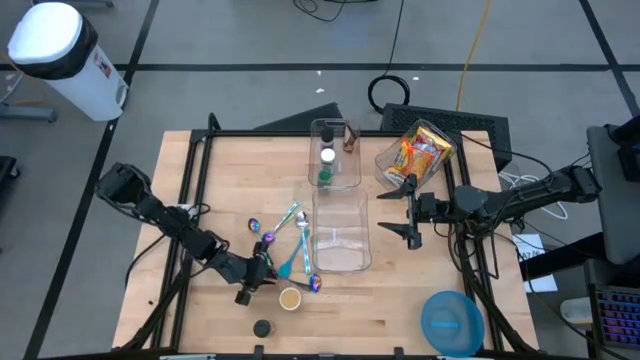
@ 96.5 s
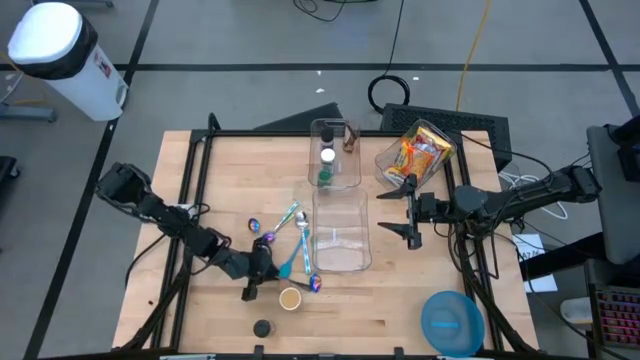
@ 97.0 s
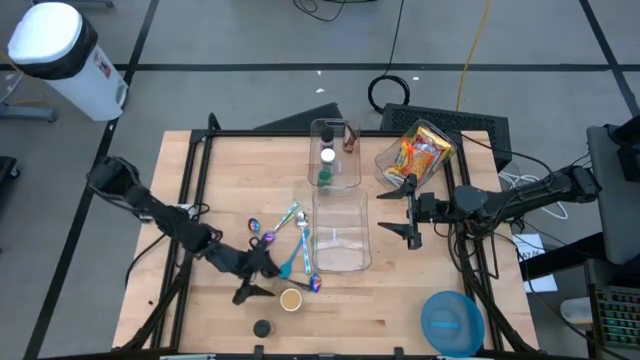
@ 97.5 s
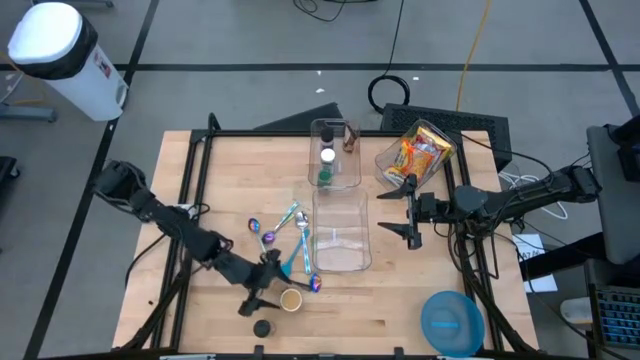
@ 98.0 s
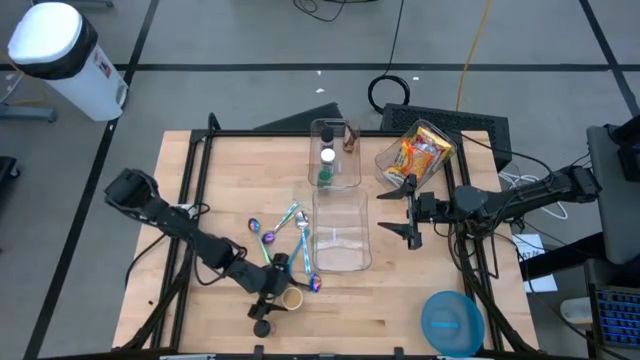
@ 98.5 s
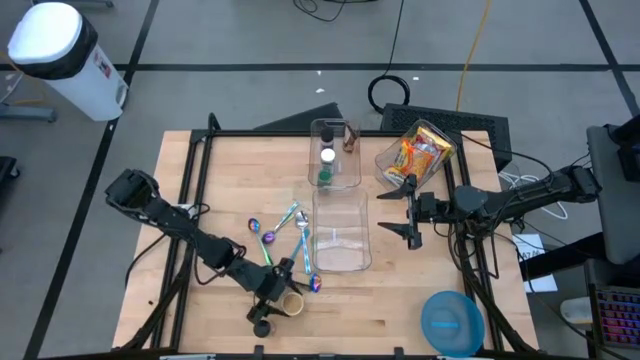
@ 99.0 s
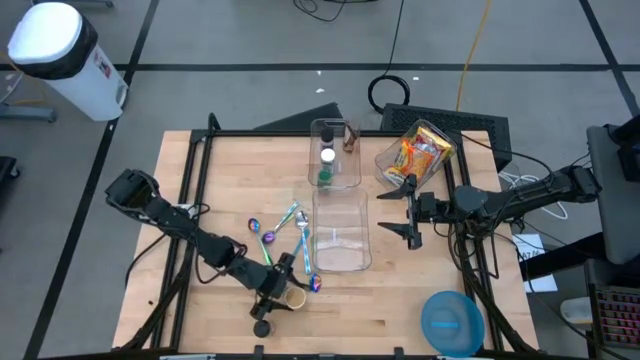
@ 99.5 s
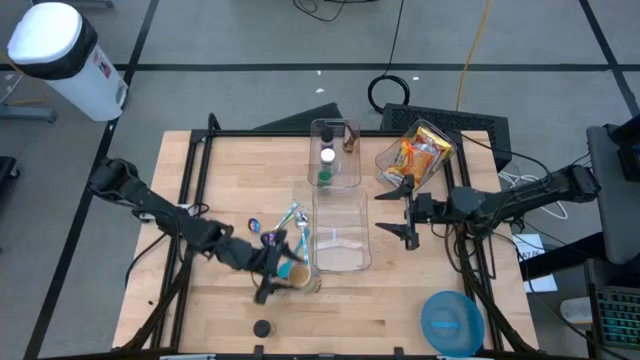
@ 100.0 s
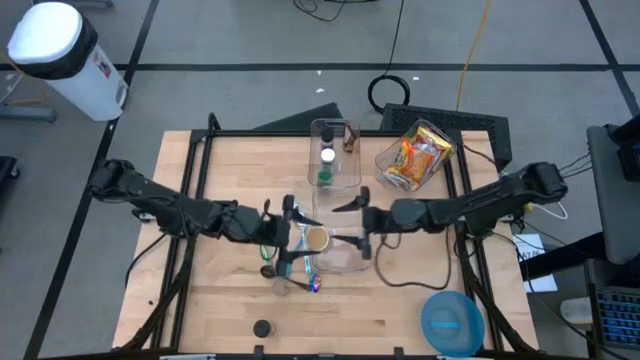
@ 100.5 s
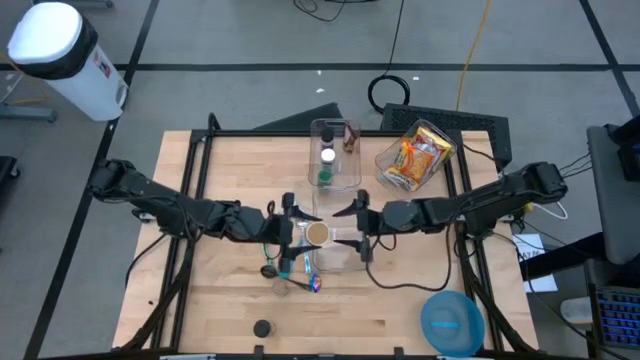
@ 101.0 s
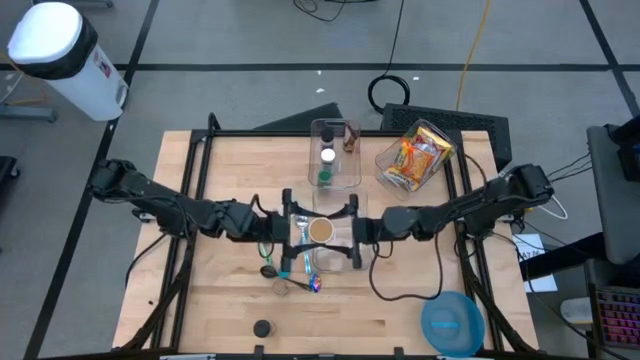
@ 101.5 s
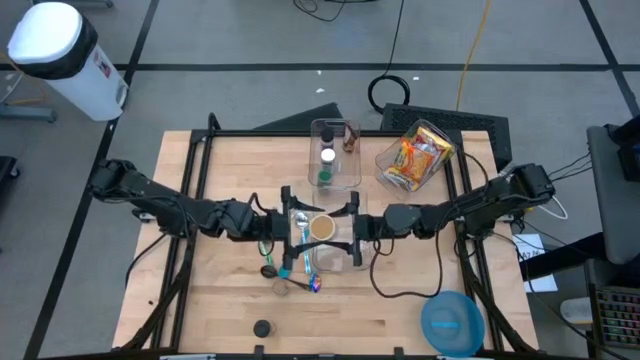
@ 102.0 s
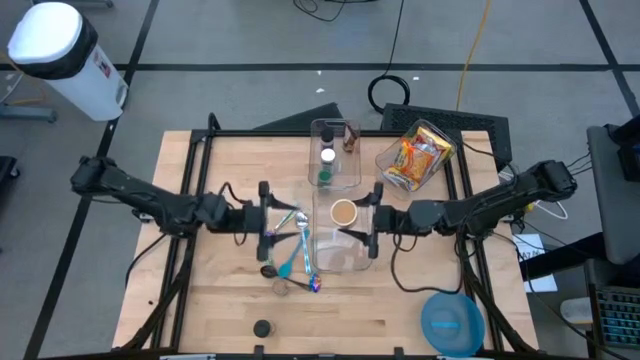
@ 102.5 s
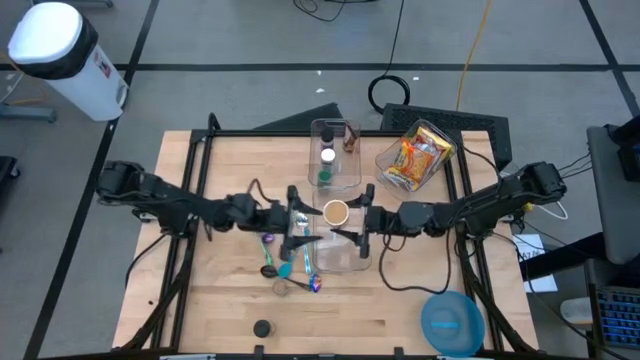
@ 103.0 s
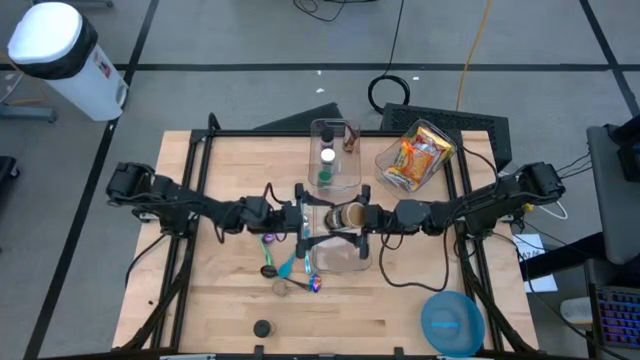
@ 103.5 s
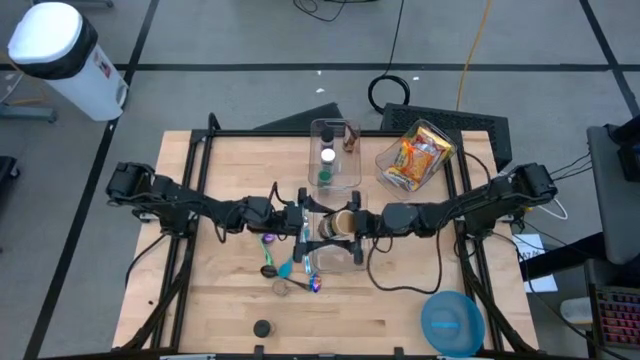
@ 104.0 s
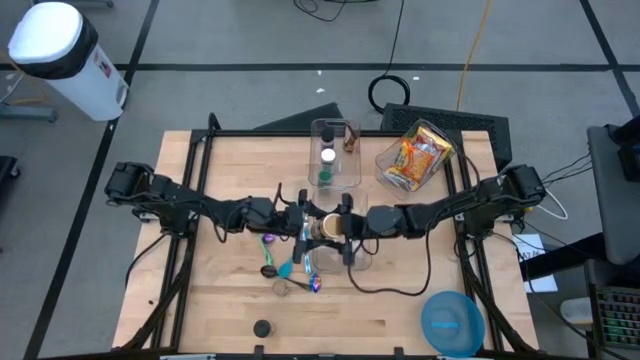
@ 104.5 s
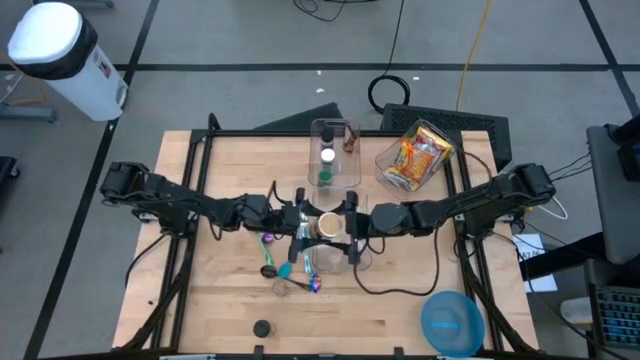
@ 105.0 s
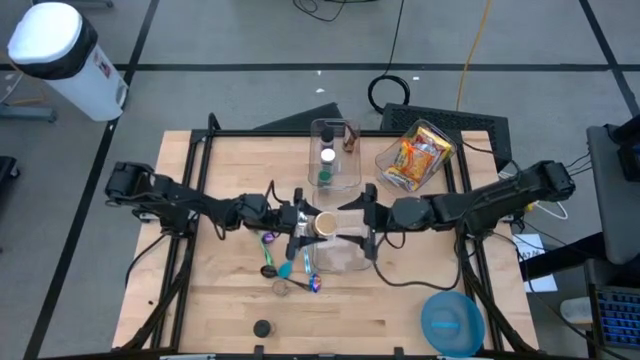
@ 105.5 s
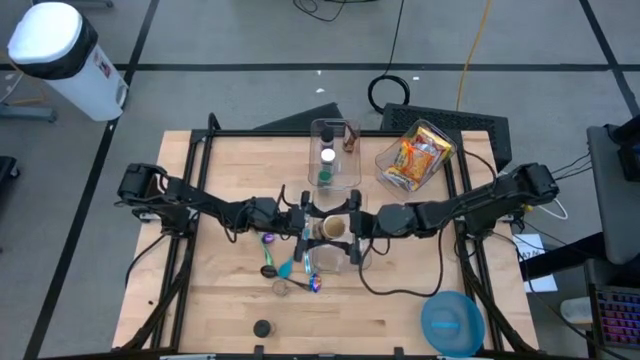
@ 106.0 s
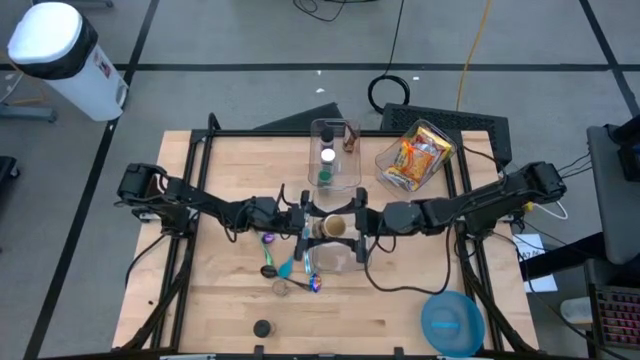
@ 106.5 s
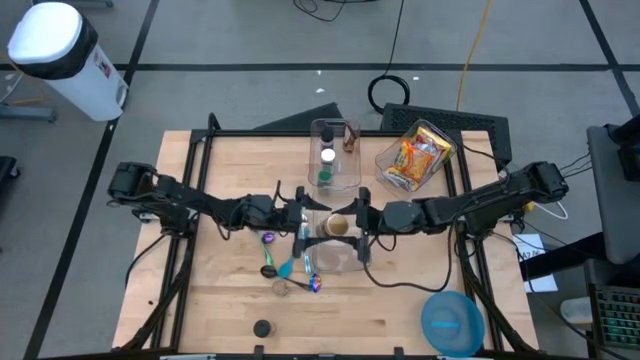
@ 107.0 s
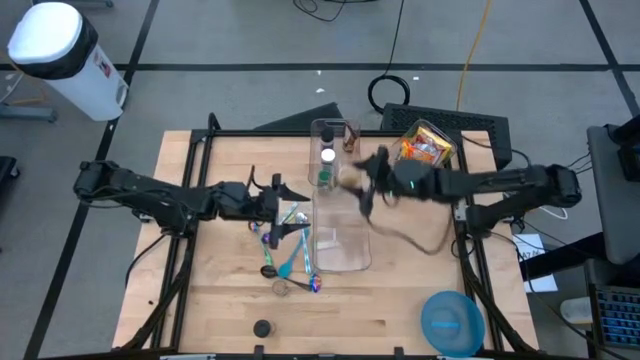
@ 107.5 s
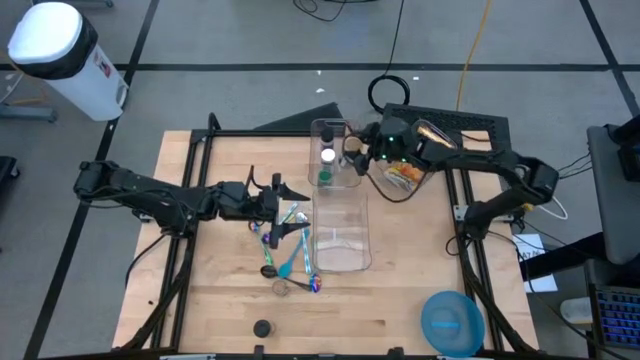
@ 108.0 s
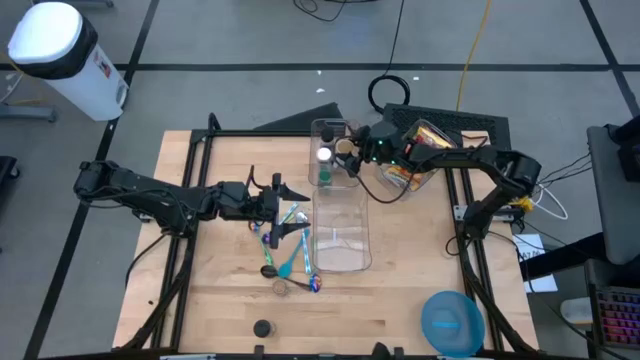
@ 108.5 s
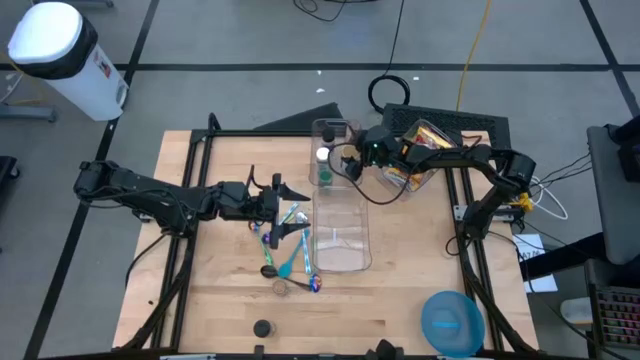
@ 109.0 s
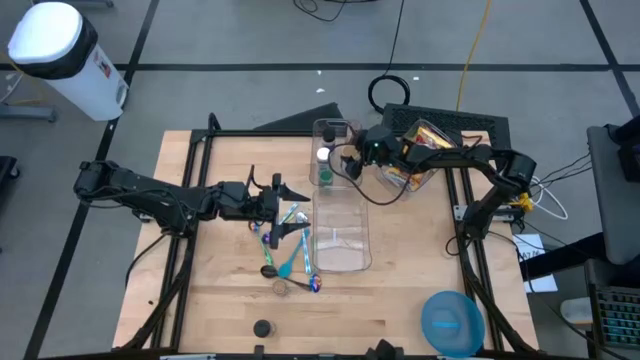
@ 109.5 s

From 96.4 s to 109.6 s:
Task: Pick & Place Food Item
Put the gold spice bottle into the top left transparent bin

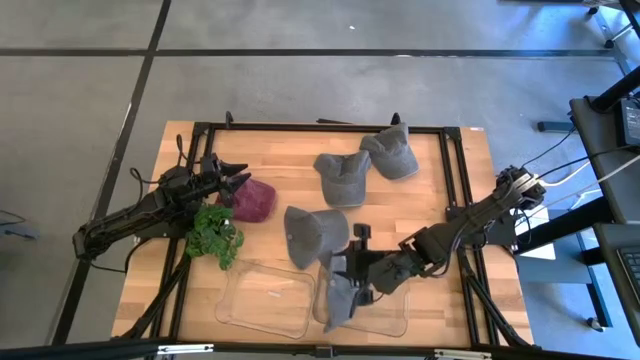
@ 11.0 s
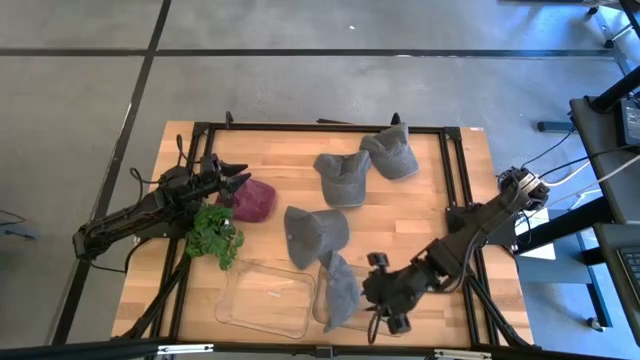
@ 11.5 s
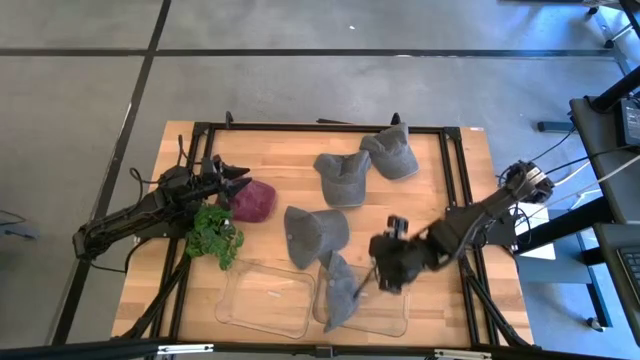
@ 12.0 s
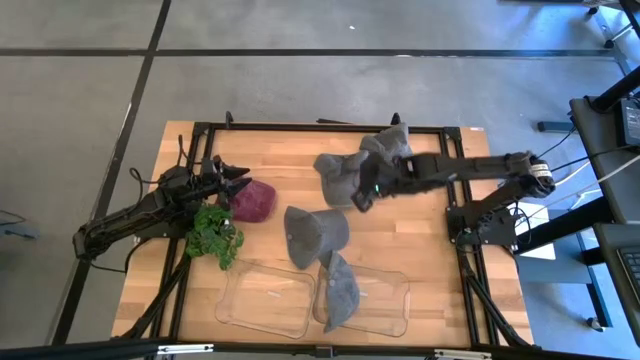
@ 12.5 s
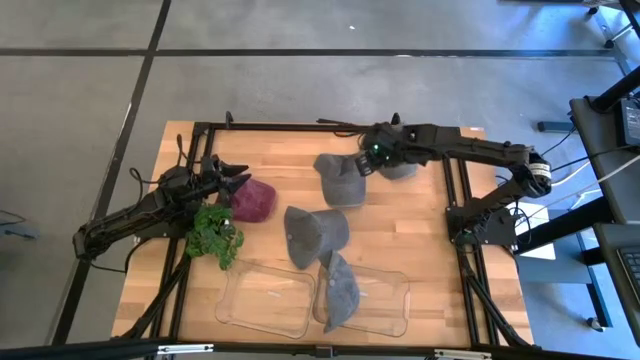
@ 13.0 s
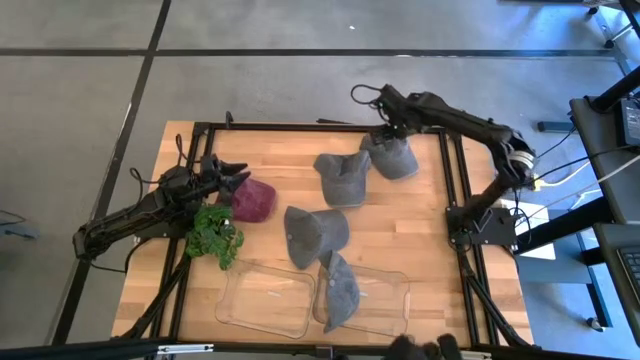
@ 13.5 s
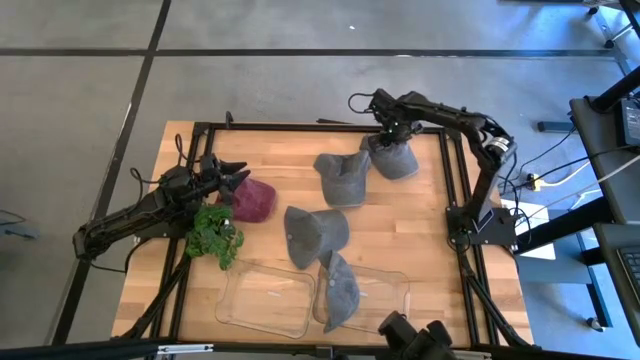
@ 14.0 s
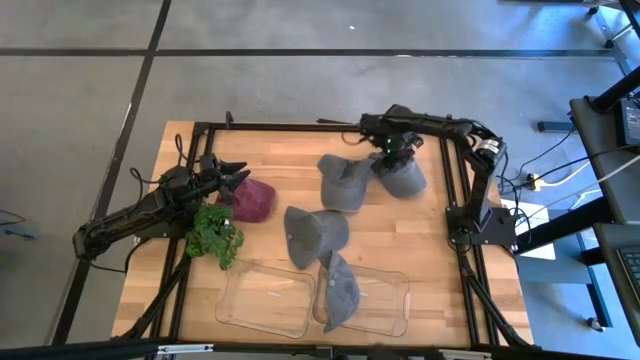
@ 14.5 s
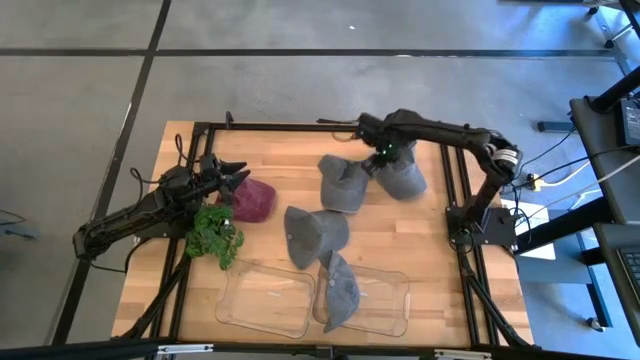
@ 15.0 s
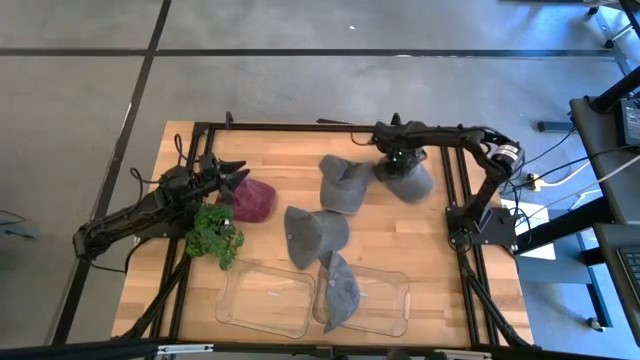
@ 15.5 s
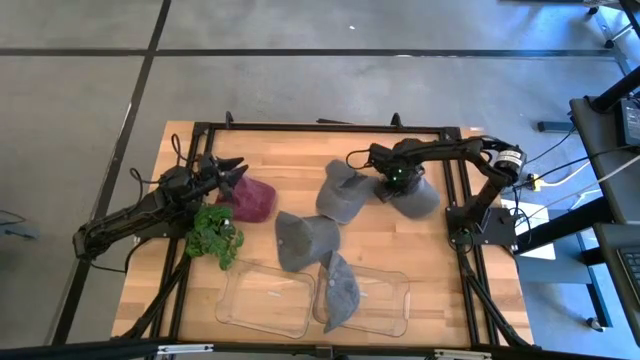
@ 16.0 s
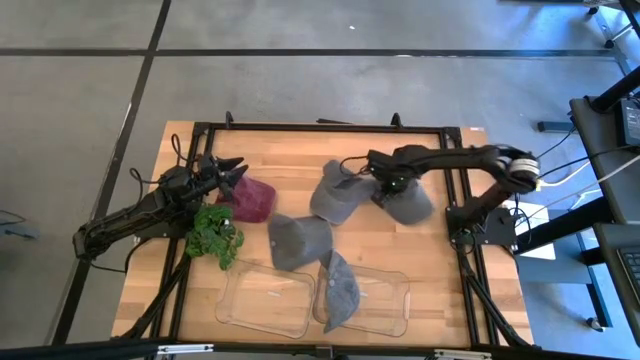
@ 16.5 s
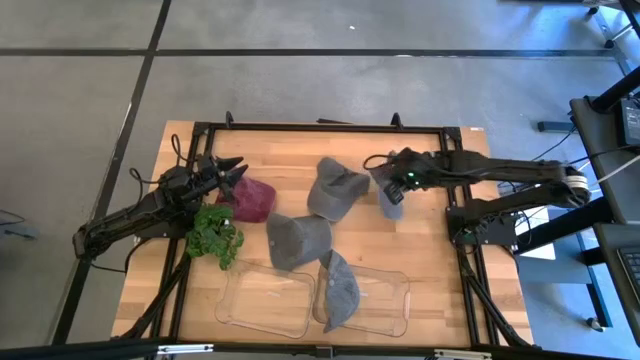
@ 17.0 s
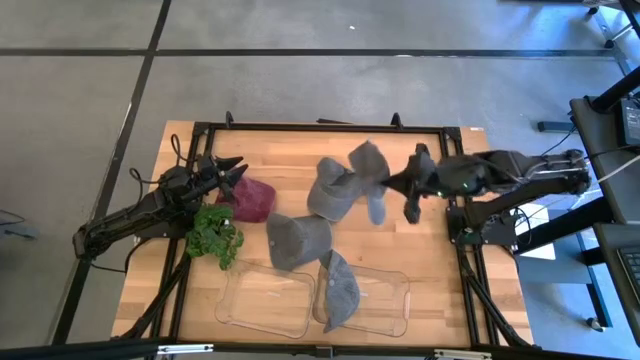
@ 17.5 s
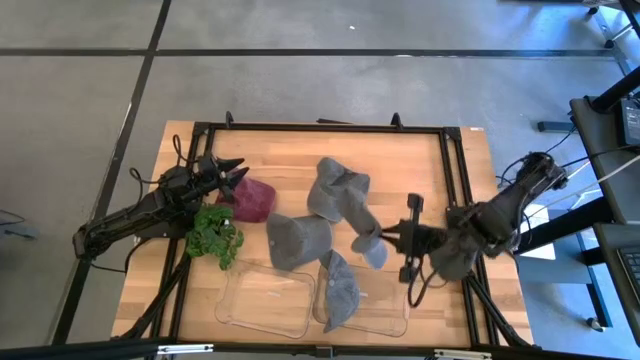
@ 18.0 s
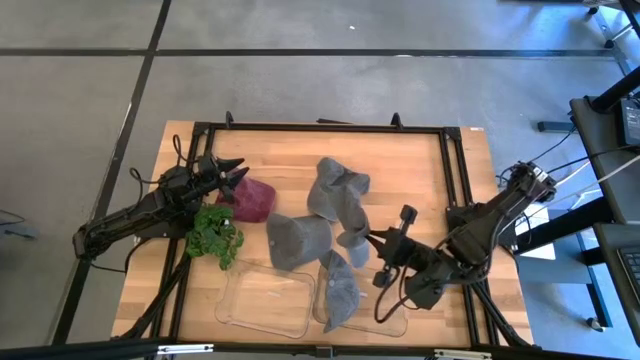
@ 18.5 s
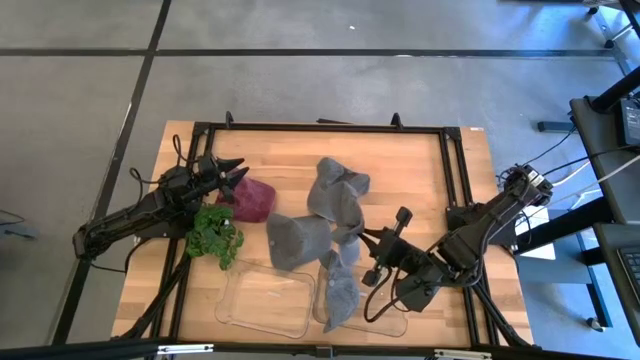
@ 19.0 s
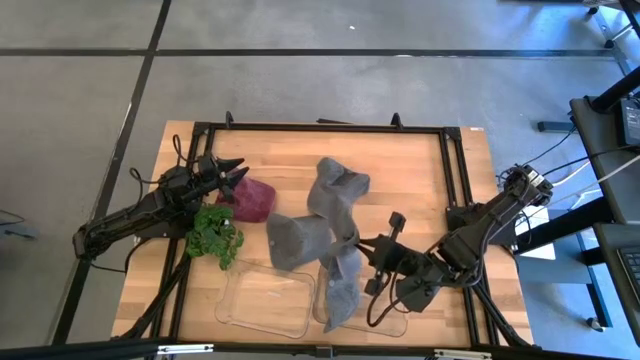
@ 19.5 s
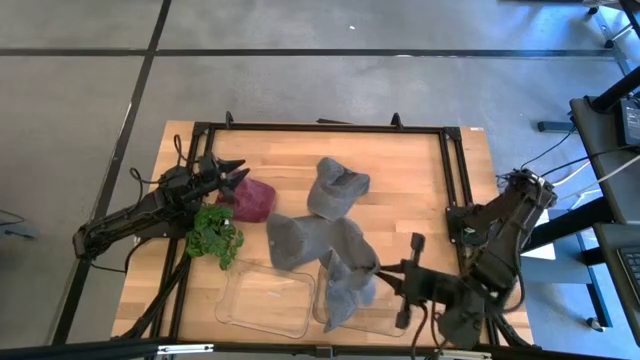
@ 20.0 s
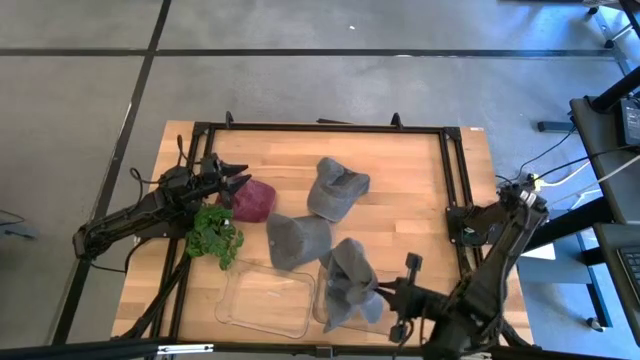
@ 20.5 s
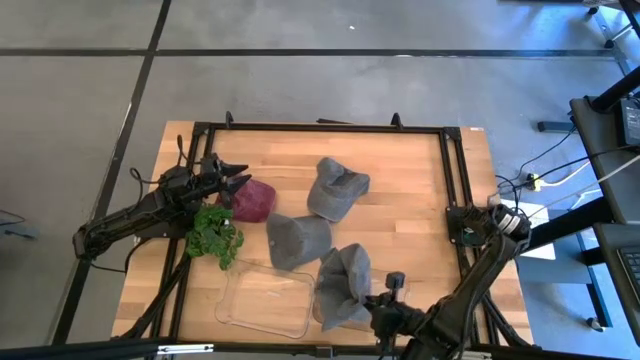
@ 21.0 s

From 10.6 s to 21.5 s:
Task: Pick & Place hat
Put the gray cap into the right transparent bin
